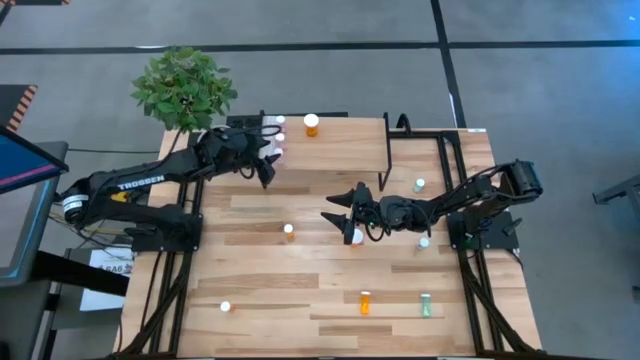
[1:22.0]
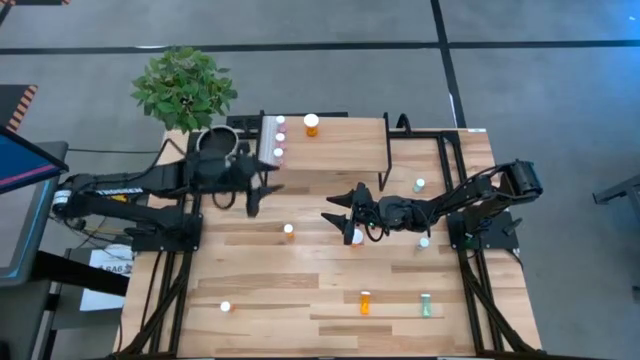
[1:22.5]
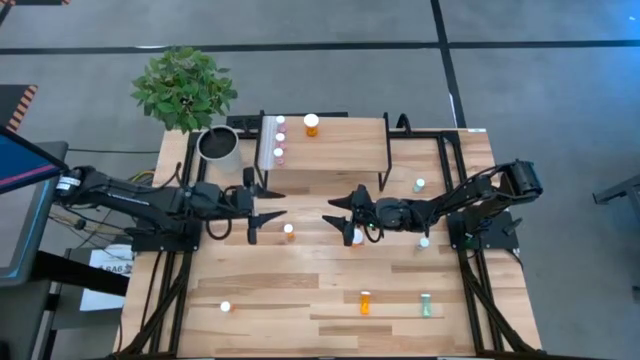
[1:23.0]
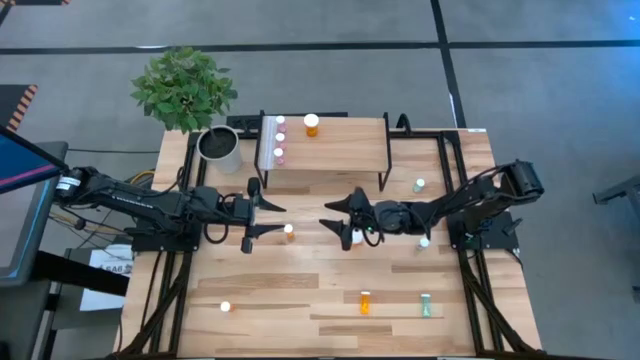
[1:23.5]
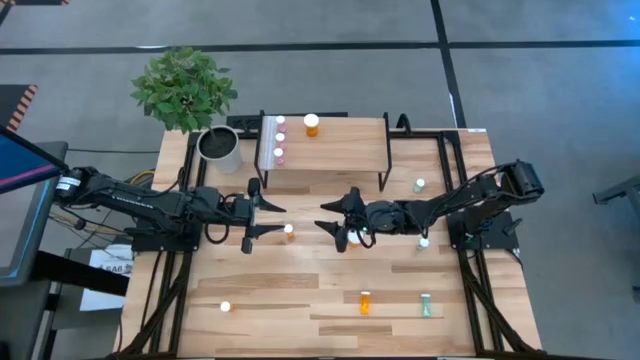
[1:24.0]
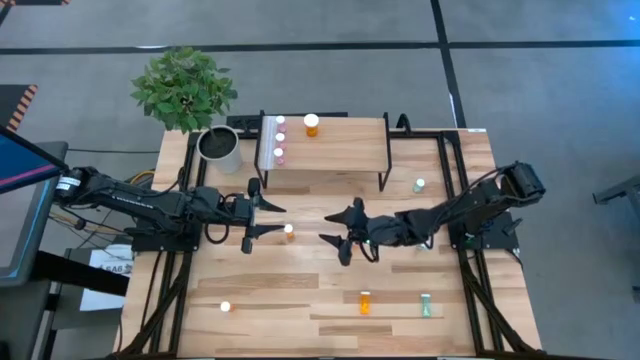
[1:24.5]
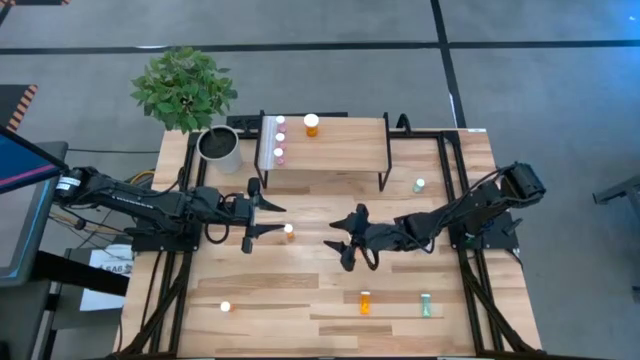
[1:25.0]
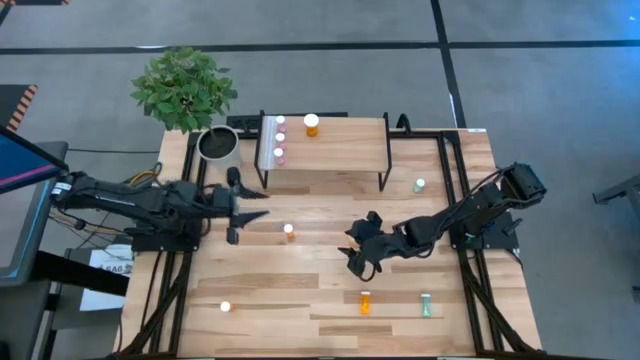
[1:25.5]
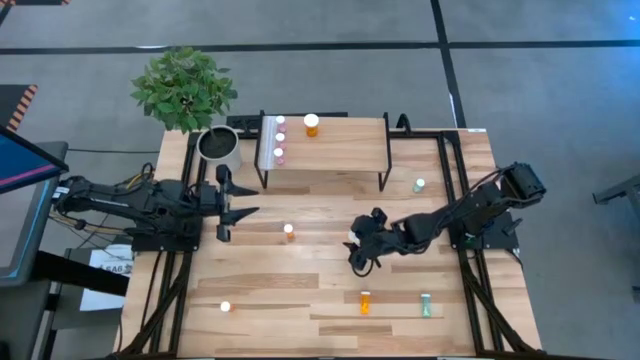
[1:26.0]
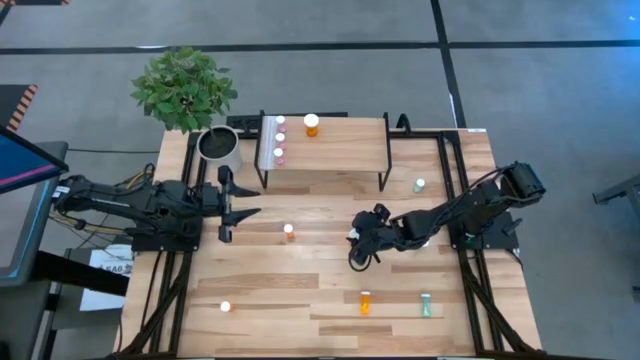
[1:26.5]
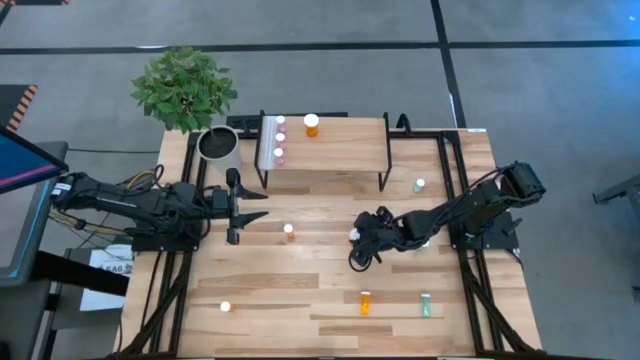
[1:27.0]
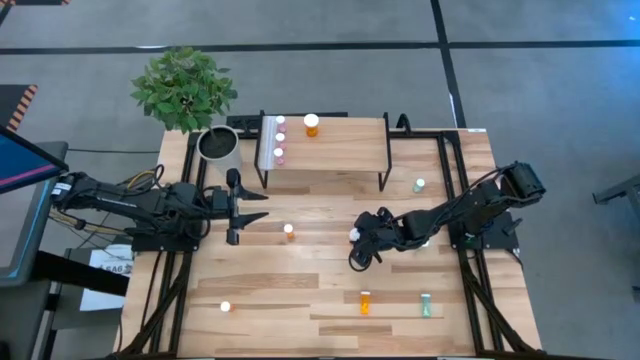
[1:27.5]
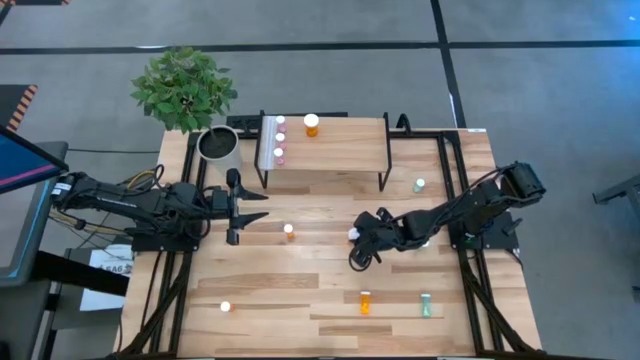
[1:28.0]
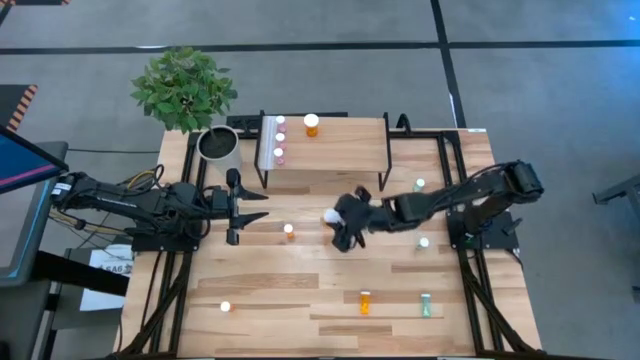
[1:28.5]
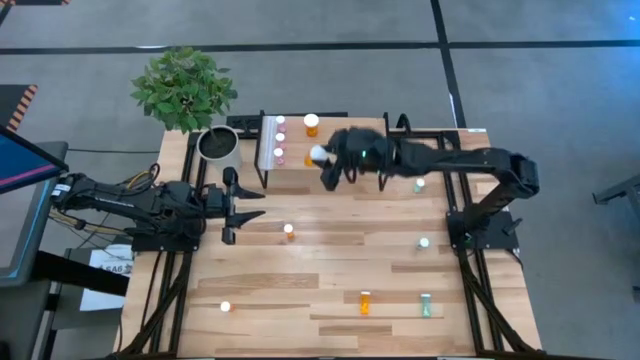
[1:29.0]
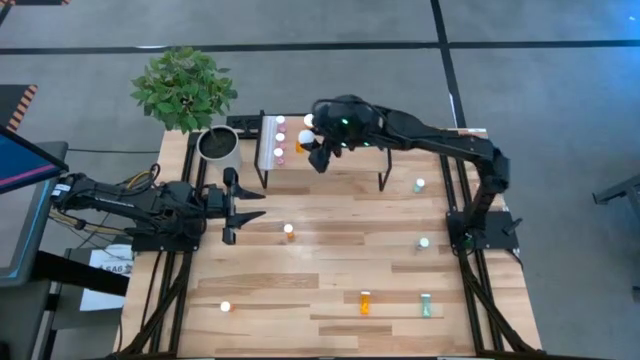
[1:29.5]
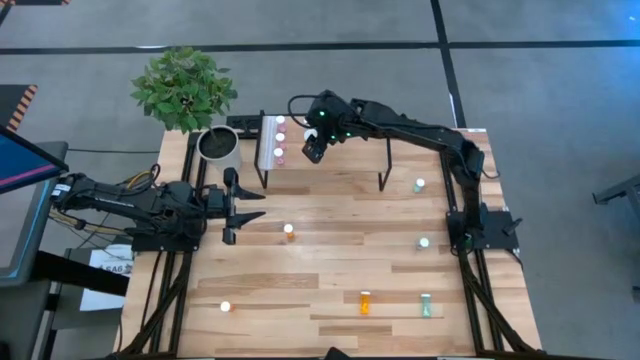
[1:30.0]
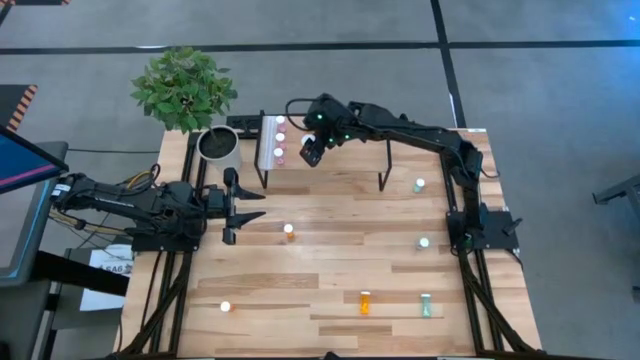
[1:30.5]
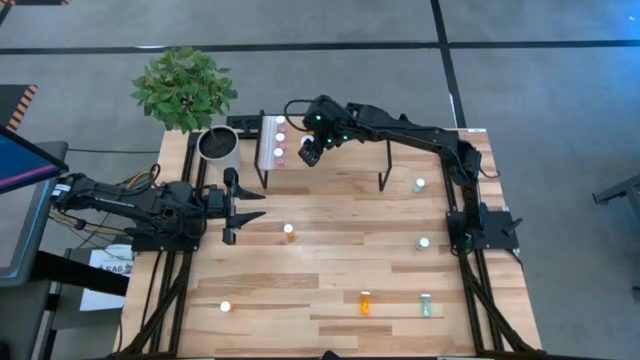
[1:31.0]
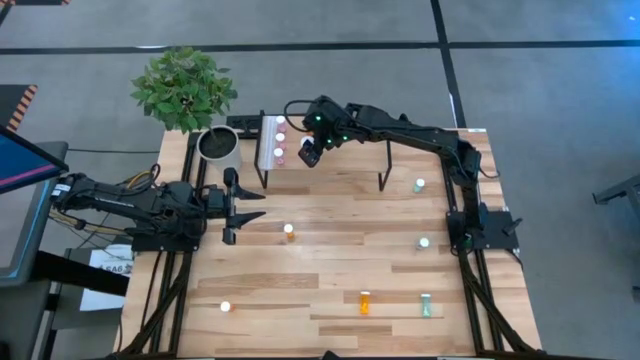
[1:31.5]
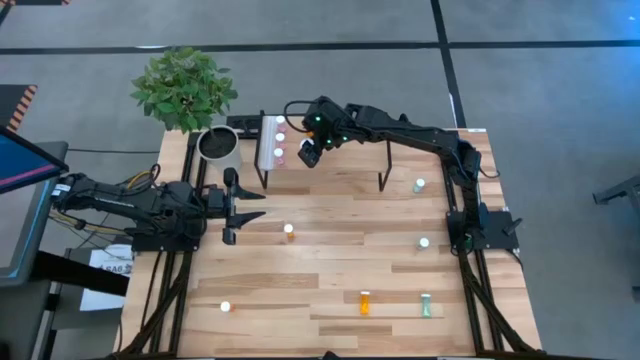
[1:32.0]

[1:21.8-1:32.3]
Task: Pick and place medicine bottles onto shelf by color
Put the large orange pill bottle on the shelf aligned with the other large orange pill bottle

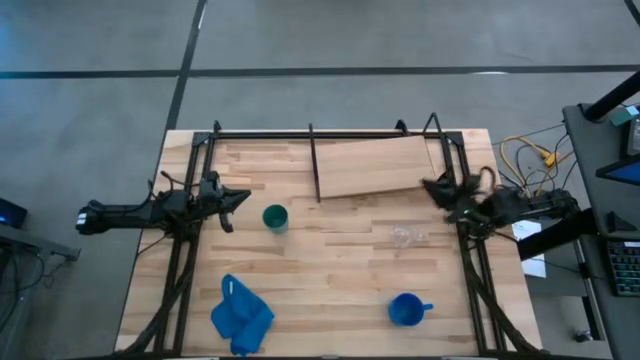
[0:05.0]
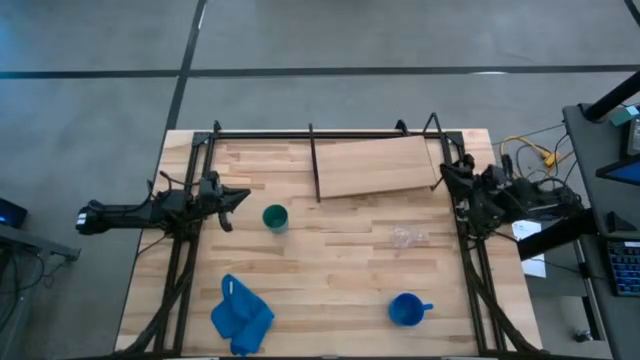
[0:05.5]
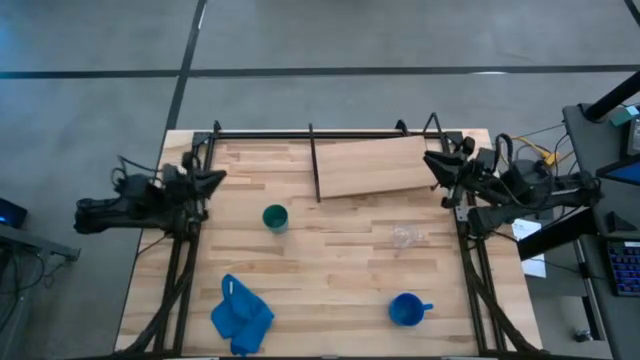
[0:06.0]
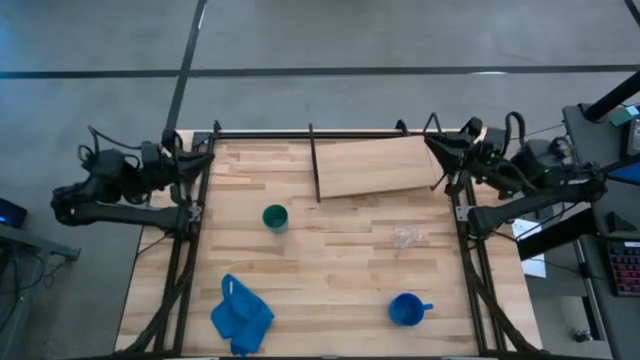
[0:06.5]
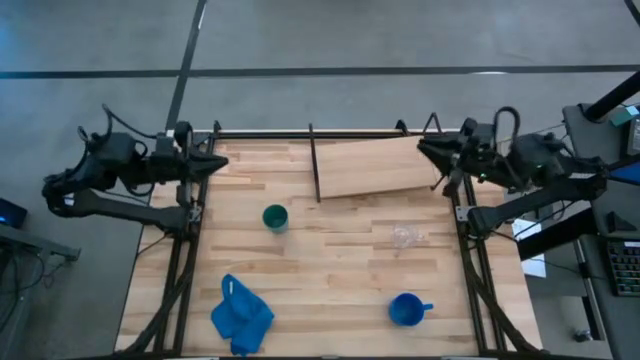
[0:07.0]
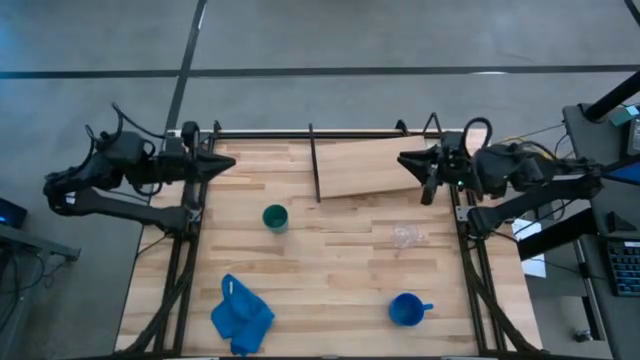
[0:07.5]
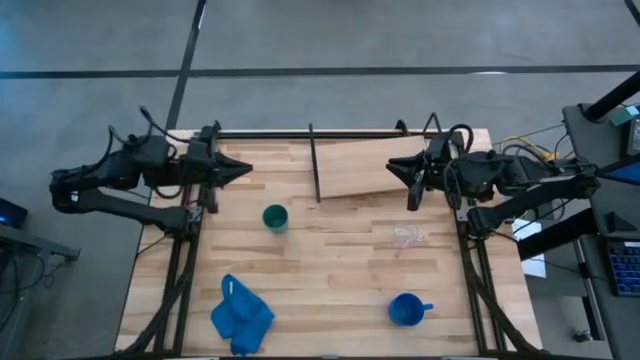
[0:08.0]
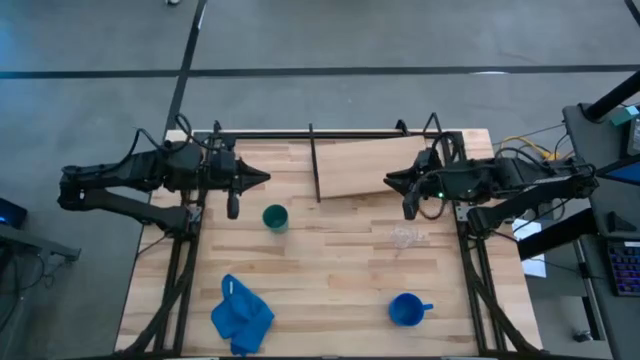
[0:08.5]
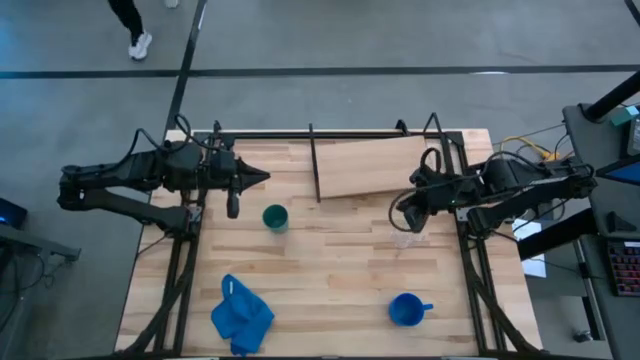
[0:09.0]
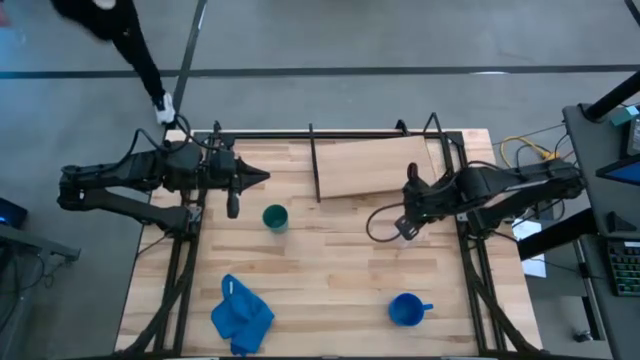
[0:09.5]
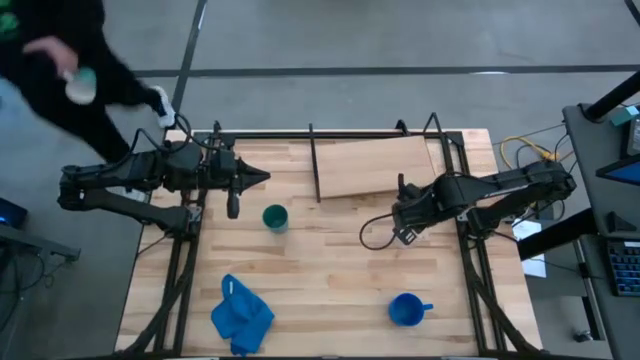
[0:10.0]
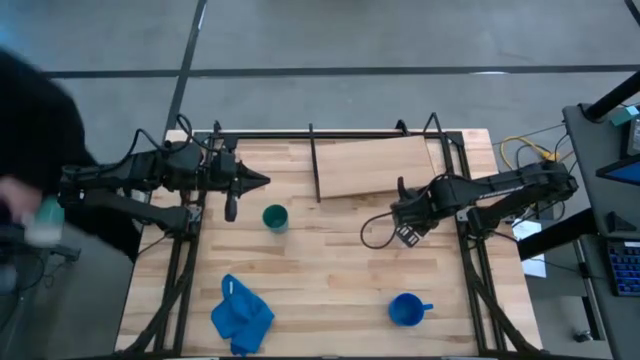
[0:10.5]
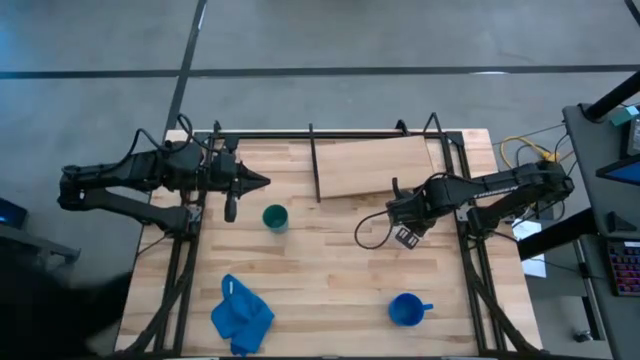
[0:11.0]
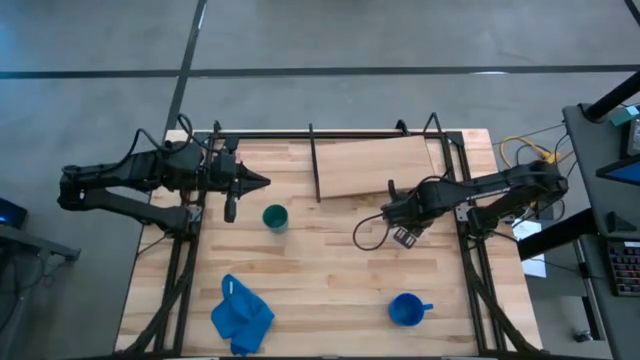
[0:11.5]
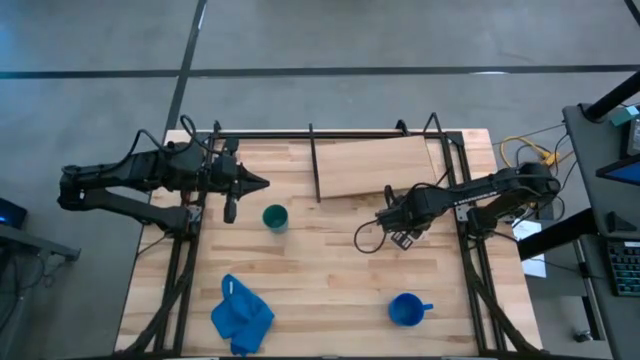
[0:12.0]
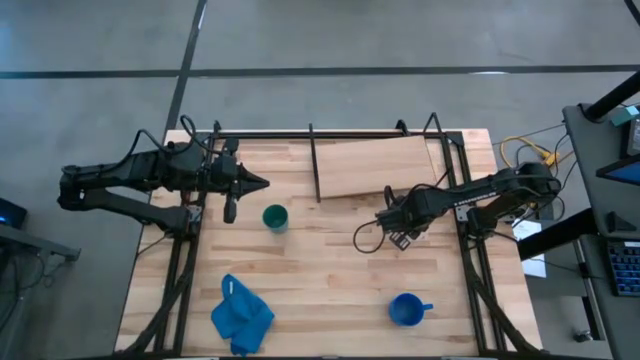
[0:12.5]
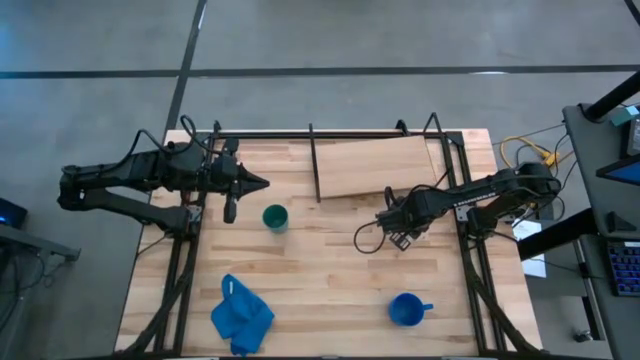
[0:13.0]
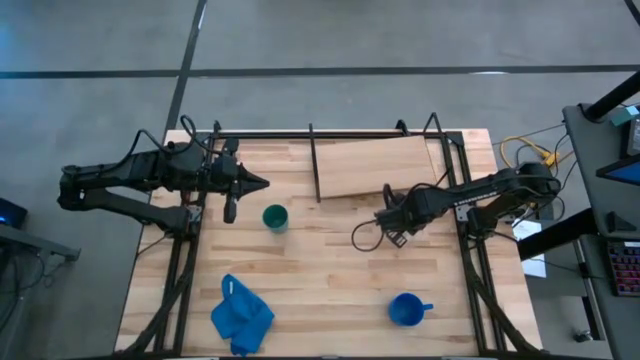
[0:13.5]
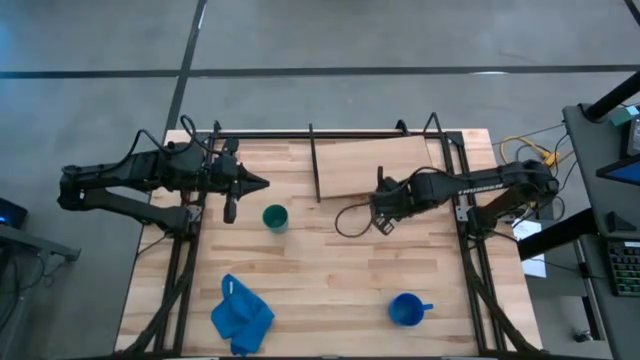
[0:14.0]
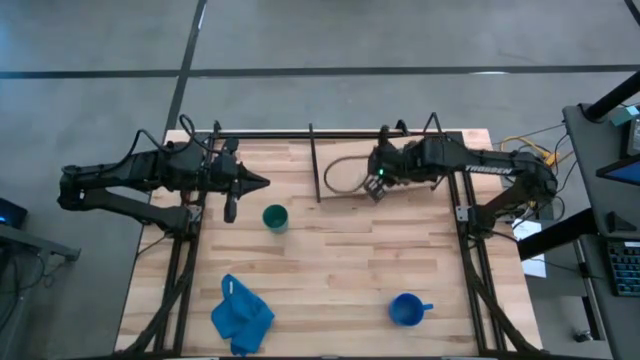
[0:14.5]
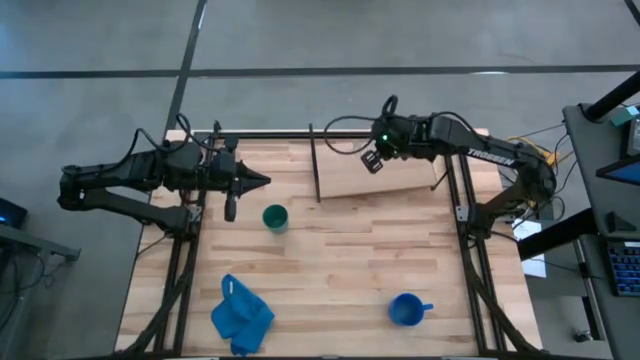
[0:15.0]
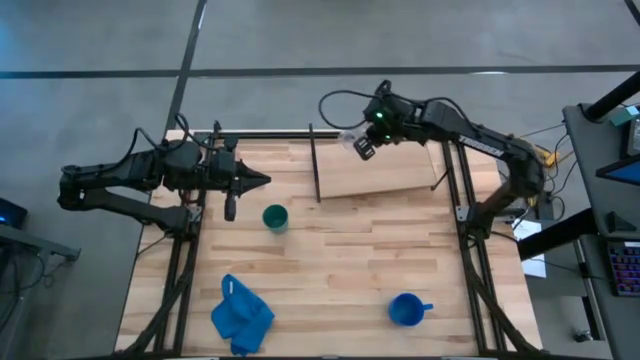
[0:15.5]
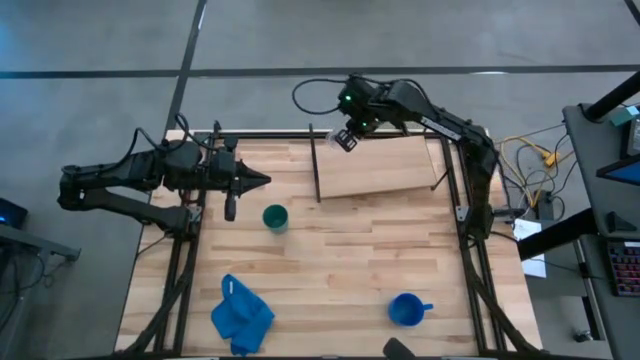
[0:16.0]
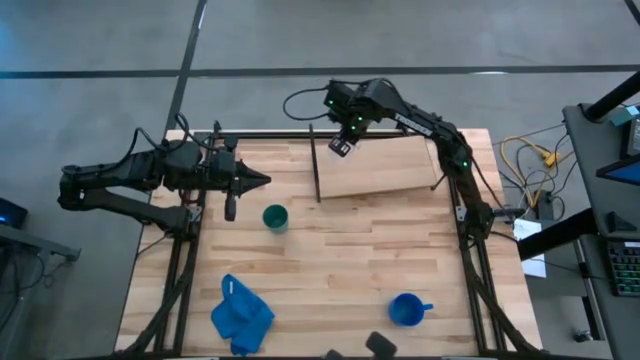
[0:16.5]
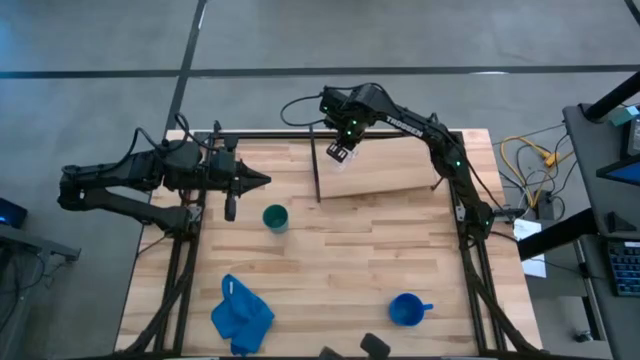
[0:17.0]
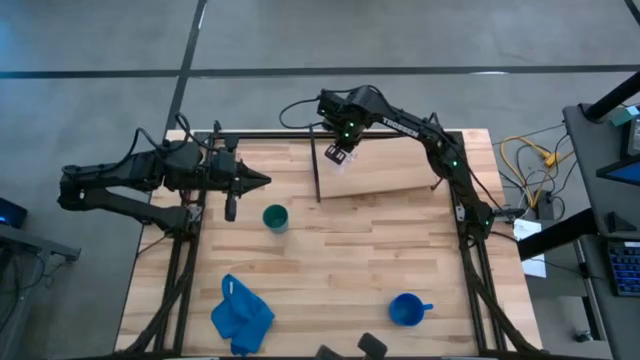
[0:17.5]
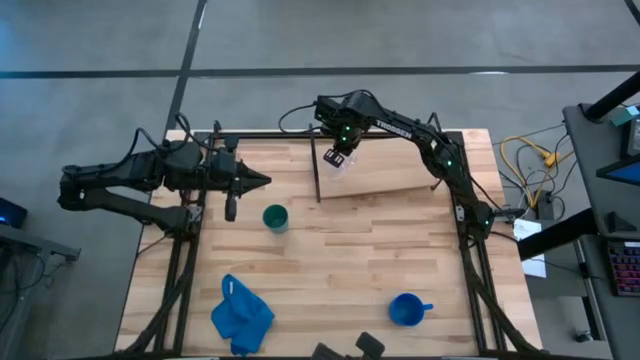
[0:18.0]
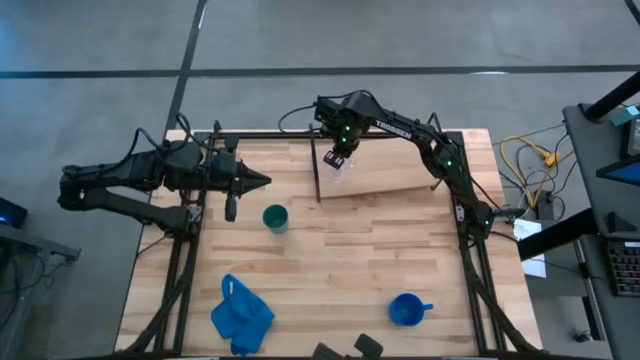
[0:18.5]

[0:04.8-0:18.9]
Task: Stack small to large cups/mugs on shelf
Put the transparent mug on the shelf
